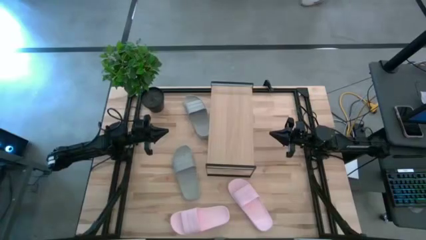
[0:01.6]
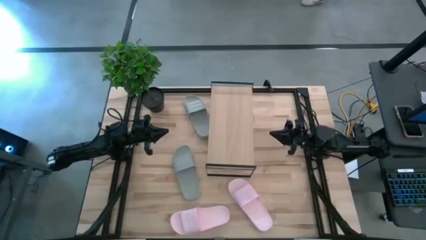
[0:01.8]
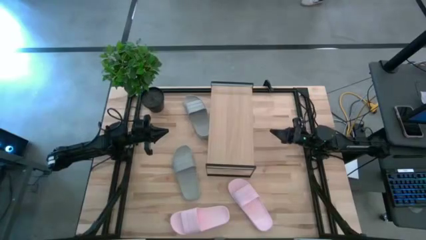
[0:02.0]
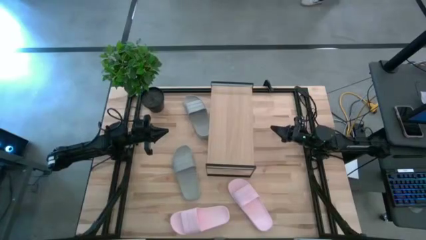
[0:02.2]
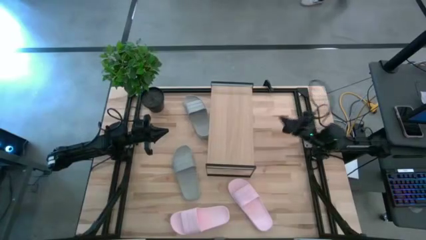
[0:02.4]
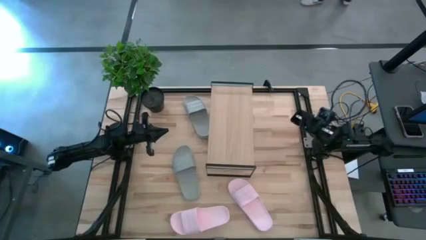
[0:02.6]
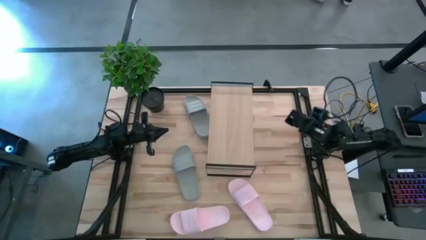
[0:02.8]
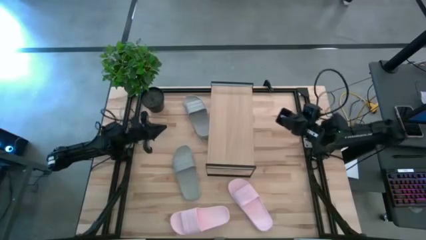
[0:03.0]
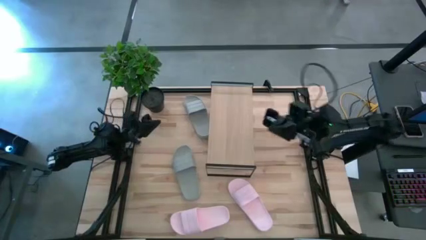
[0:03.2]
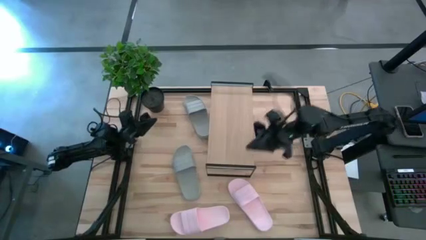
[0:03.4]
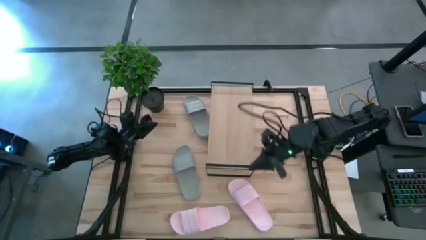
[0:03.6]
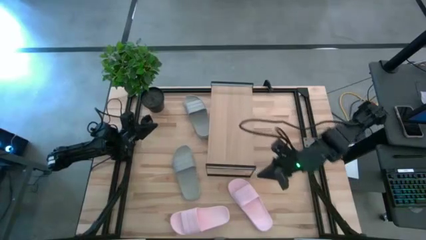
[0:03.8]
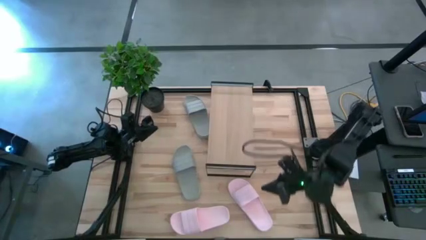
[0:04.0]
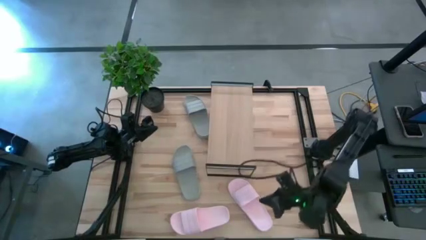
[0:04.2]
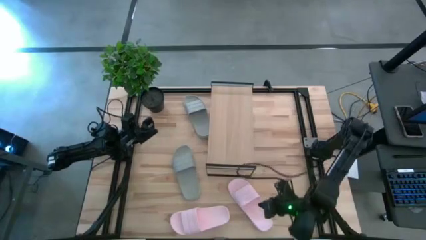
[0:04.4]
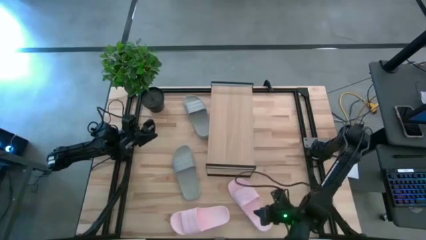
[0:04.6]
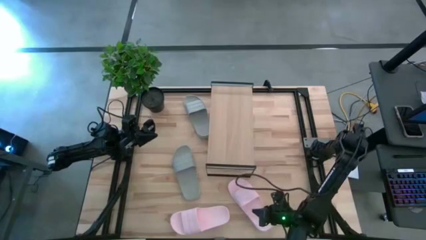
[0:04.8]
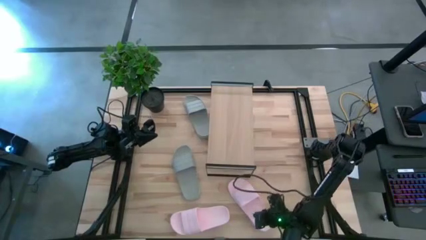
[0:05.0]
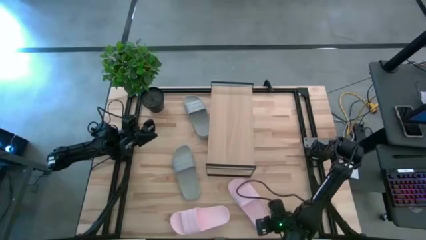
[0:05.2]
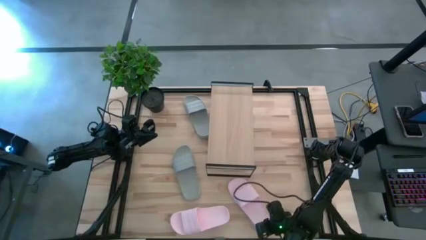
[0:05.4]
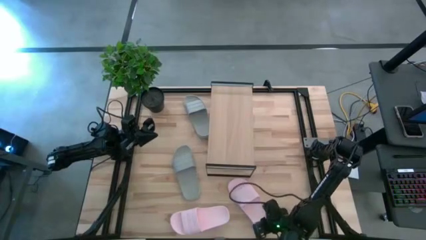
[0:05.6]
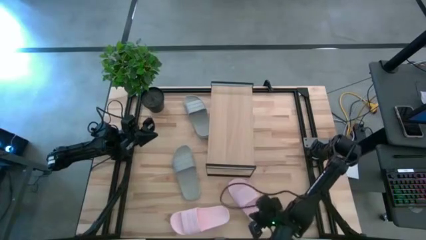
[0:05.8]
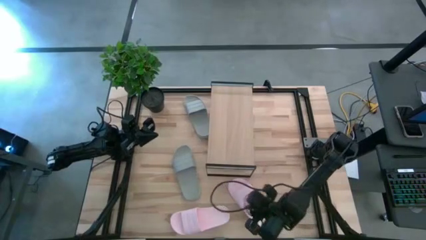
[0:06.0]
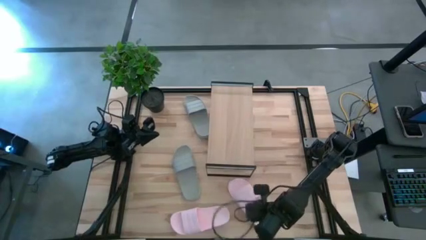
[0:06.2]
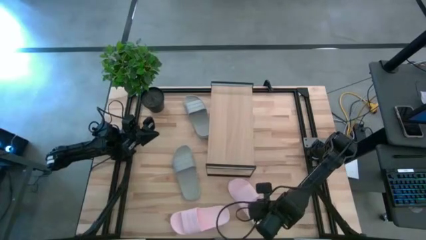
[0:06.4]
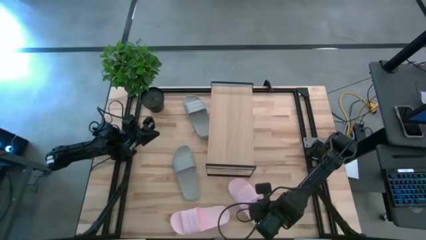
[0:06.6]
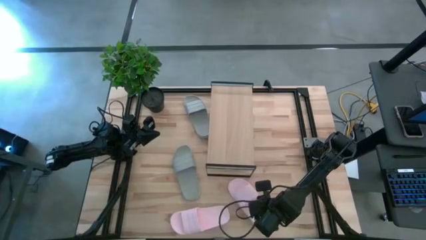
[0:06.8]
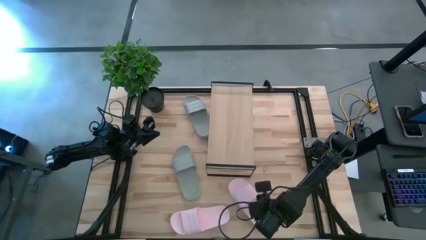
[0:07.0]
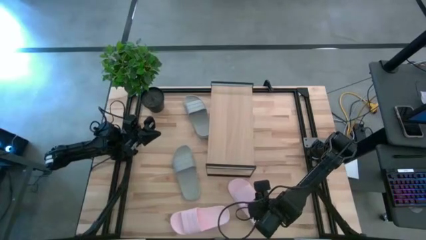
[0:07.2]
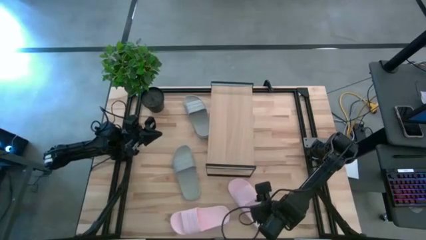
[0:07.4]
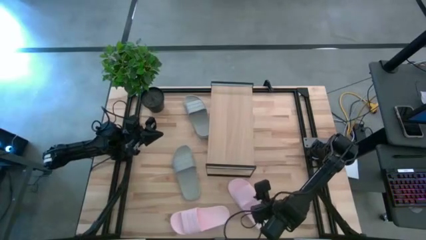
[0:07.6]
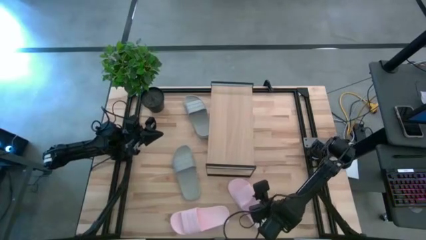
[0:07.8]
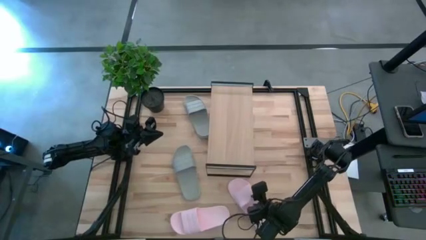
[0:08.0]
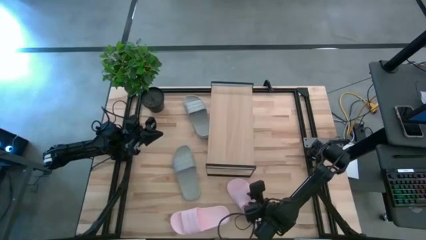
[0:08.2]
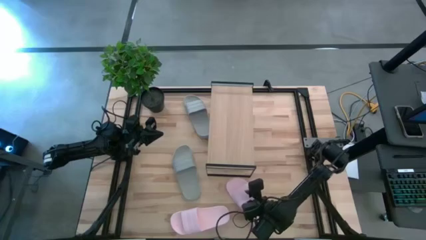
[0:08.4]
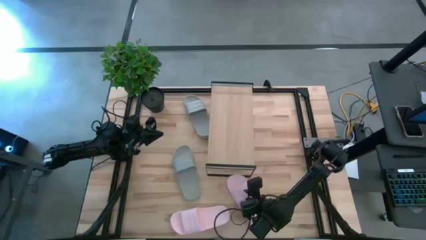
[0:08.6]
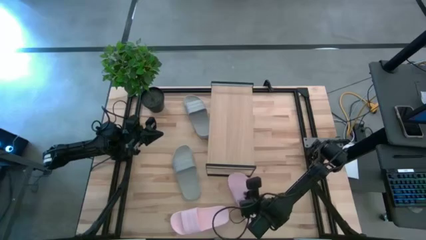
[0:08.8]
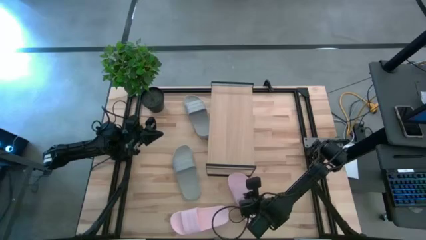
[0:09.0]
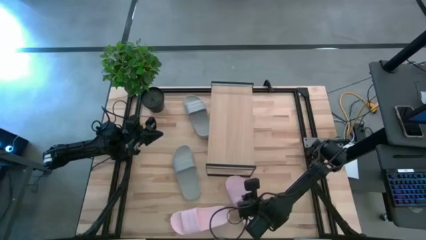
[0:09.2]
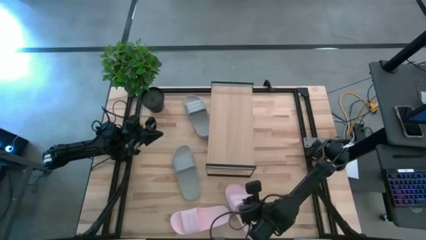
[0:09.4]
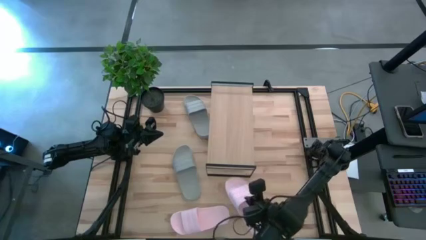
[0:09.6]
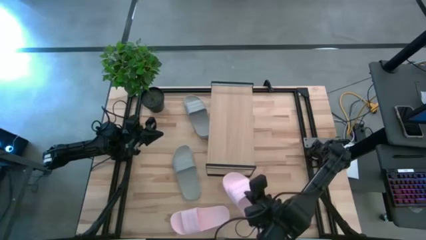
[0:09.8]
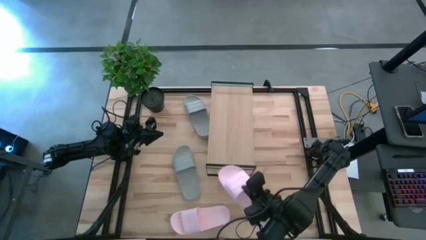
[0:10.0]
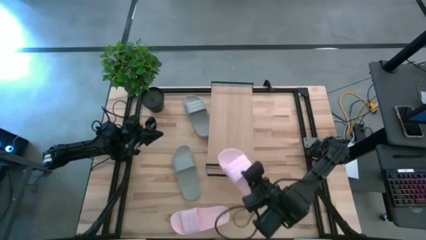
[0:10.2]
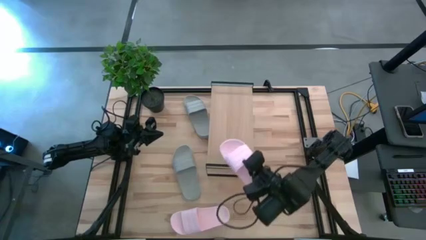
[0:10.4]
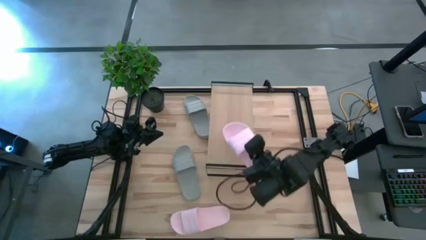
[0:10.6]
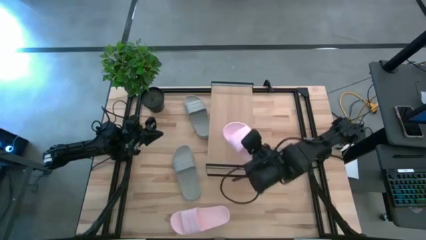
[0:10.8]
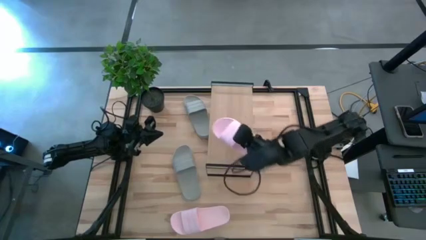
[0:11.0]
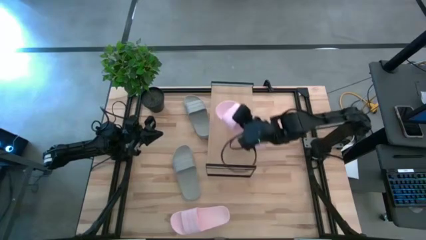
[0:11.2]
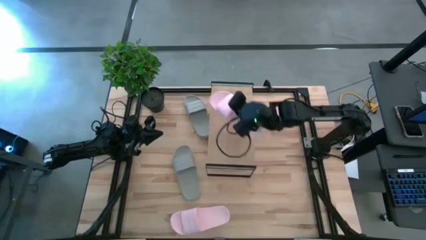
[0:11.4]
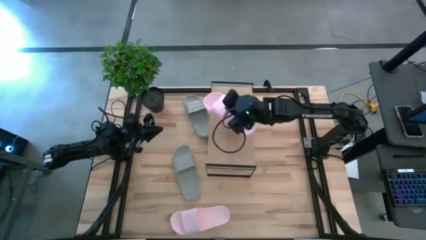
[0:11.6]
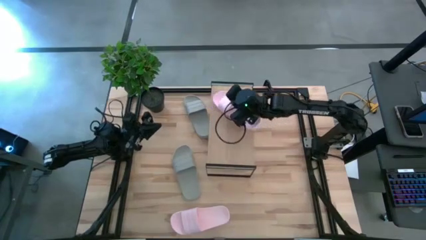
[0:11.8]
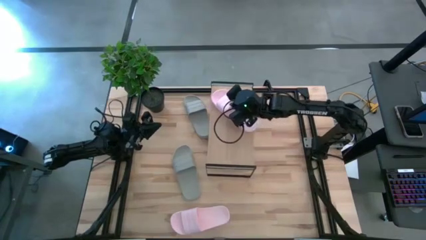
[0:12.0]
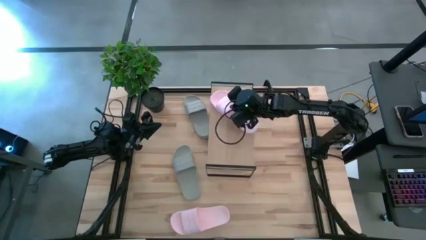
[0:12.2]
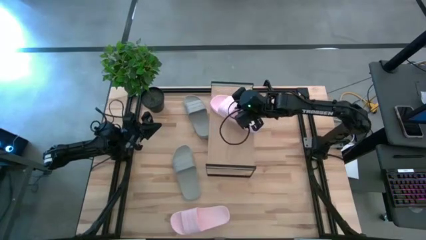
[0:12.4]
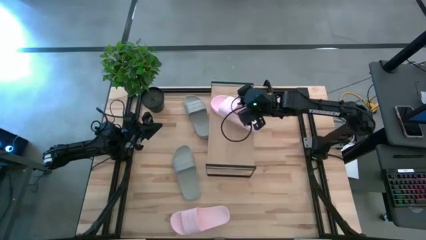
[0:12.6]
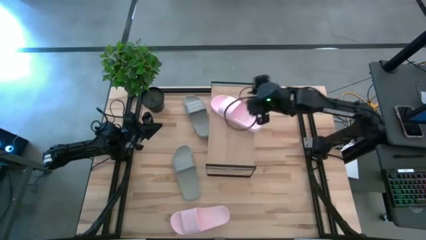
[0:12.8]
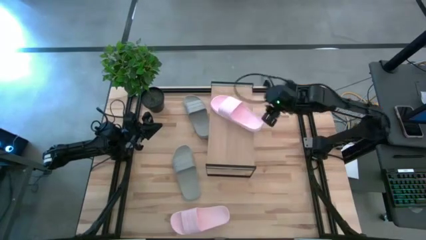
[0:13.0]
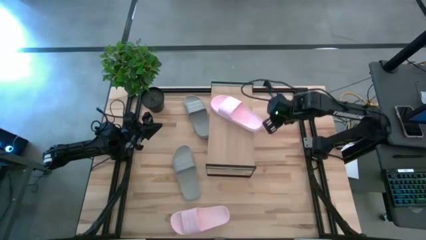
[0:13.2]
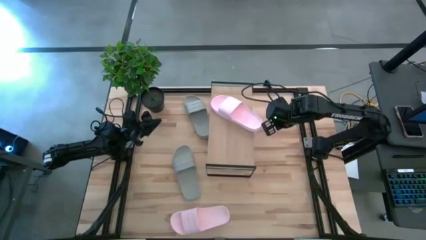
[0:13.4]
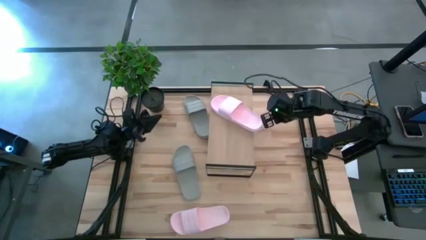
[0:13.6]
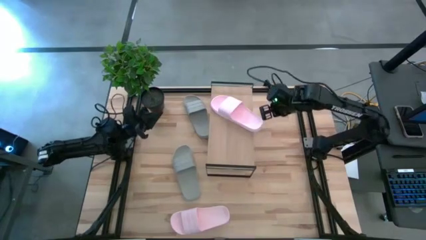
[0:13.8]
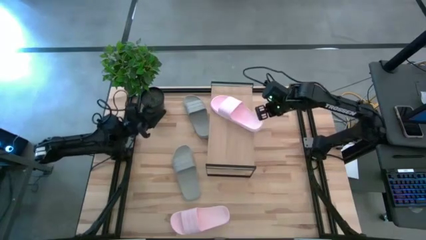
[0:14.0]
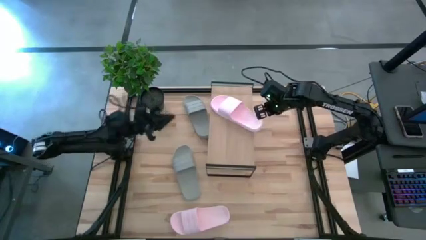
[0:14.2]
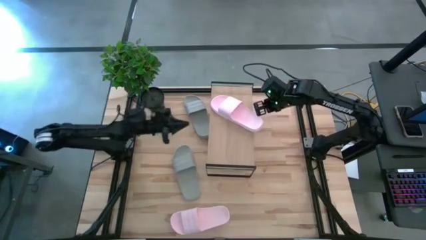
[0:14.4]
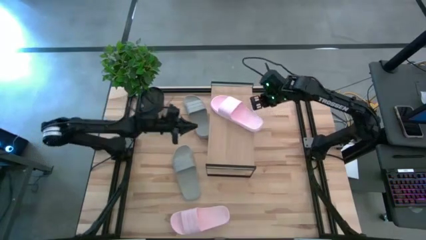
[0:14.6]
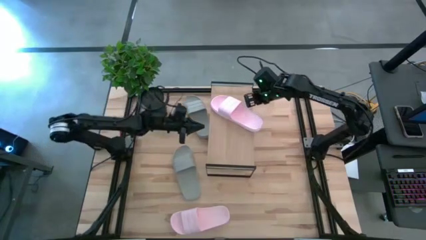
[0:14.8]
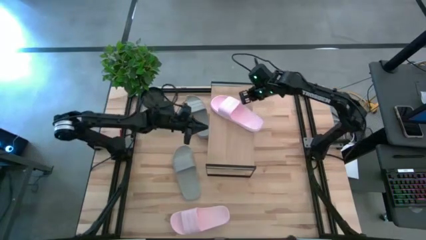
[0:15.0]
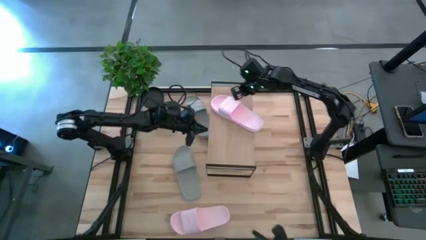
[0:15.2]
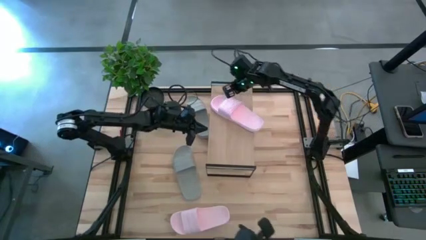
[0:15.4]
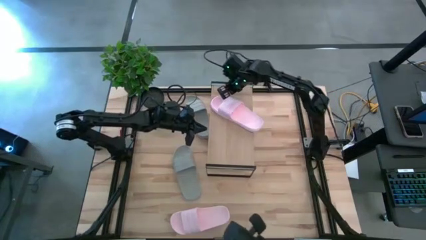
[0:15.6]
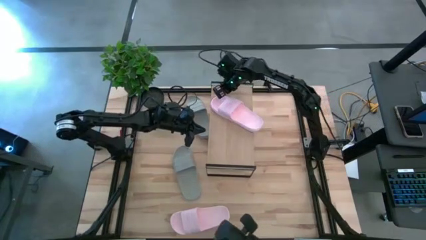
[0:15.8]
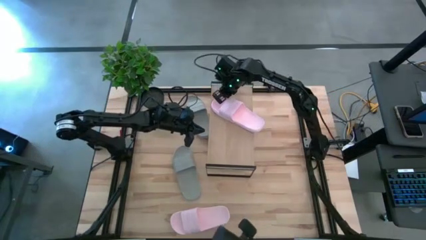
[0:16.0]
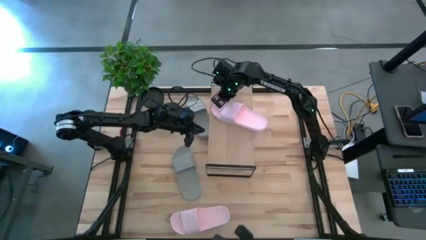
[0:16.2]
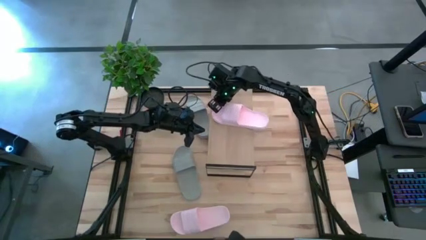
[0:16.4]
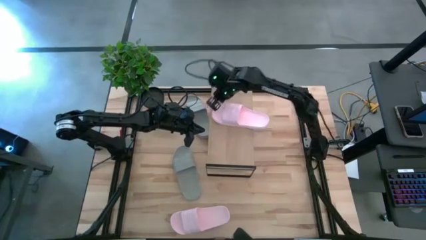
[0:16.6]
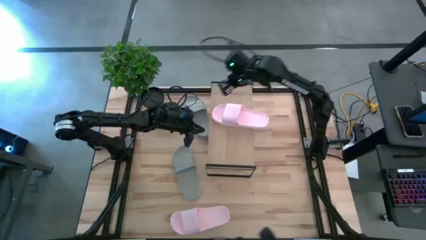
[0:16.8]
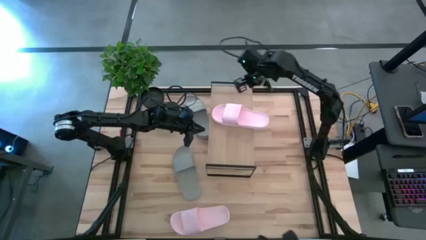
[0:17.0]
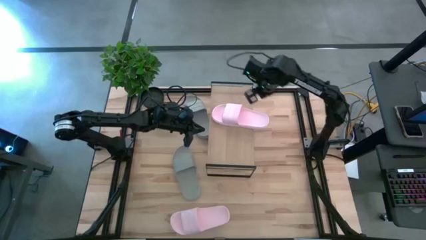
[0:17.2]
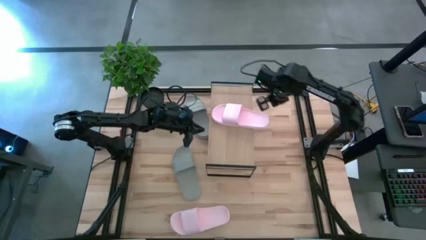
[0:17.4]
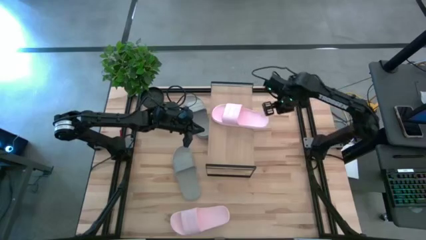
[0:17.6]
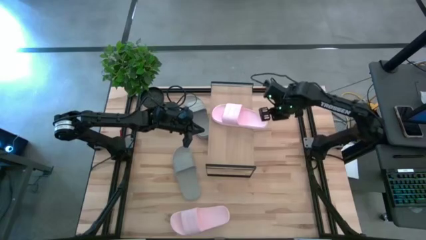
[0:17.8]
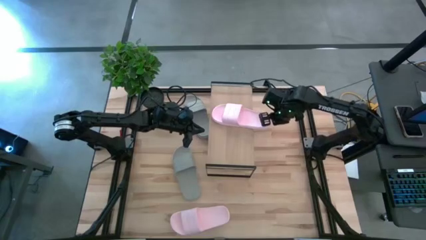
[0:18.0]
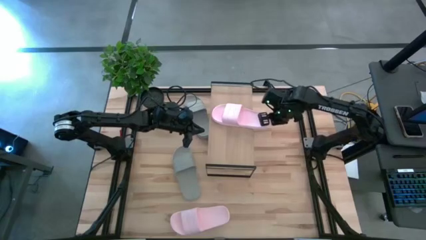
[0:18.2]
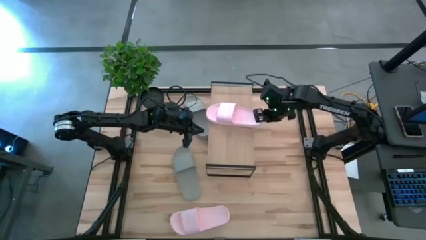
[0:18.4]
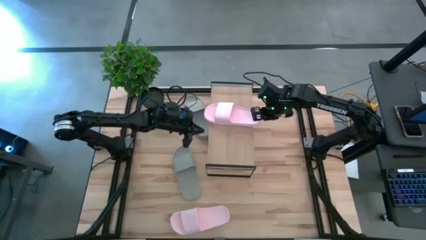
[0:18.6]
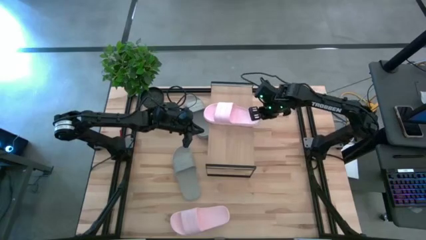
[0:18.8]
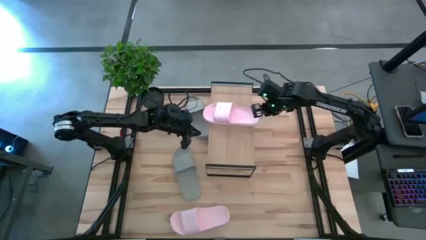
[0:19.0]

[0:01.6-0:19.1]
Task: Pick and place slides into the shelf
Put the right pink slide on the shelf
